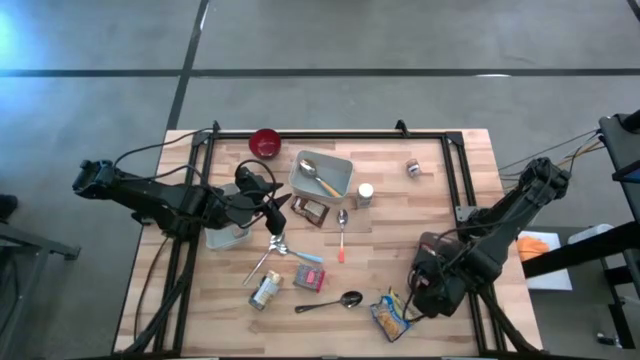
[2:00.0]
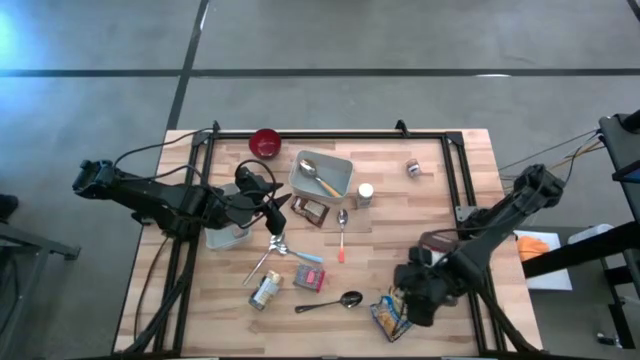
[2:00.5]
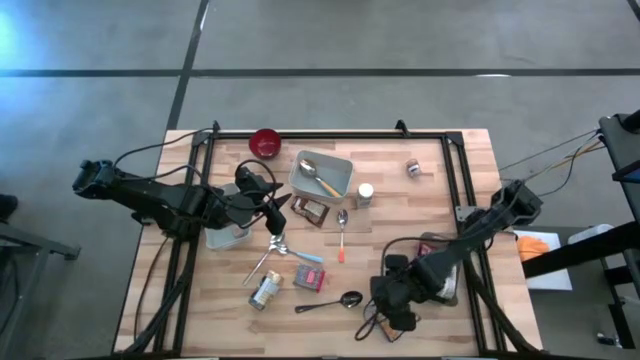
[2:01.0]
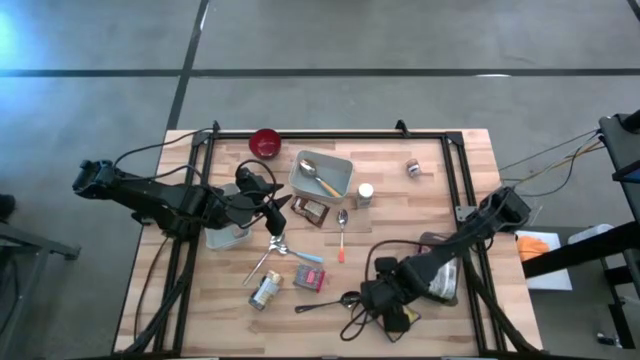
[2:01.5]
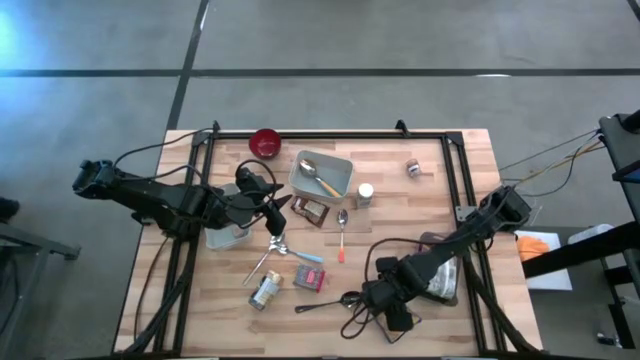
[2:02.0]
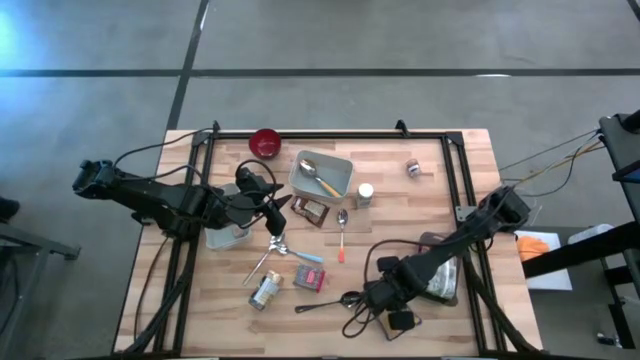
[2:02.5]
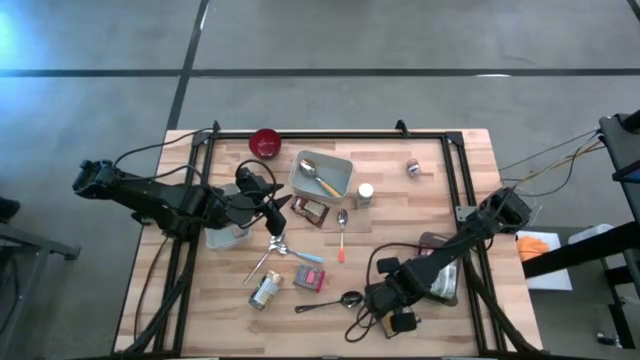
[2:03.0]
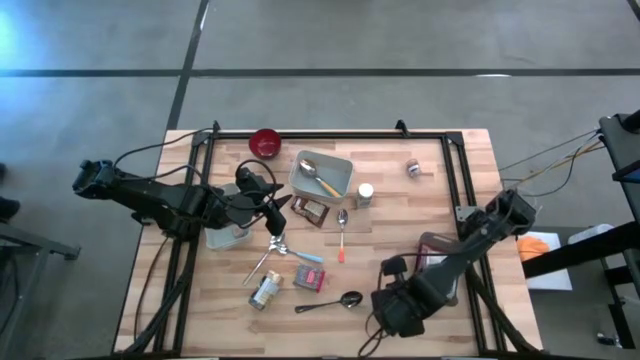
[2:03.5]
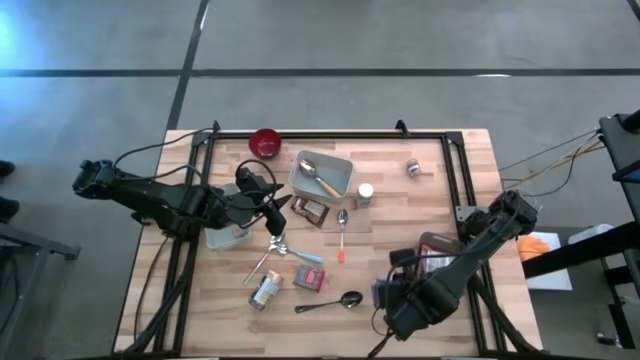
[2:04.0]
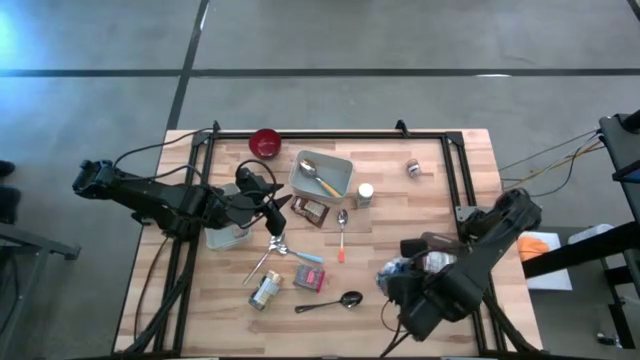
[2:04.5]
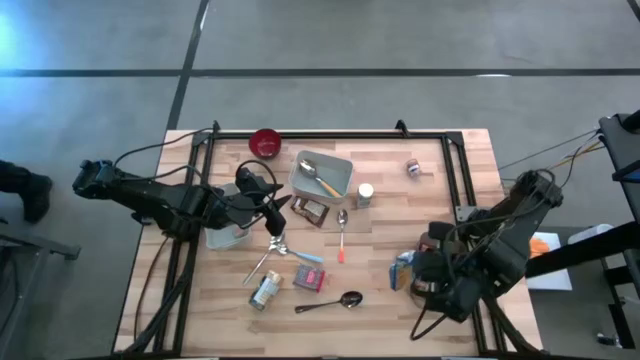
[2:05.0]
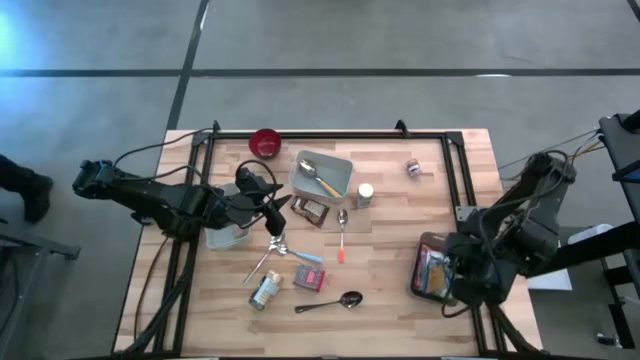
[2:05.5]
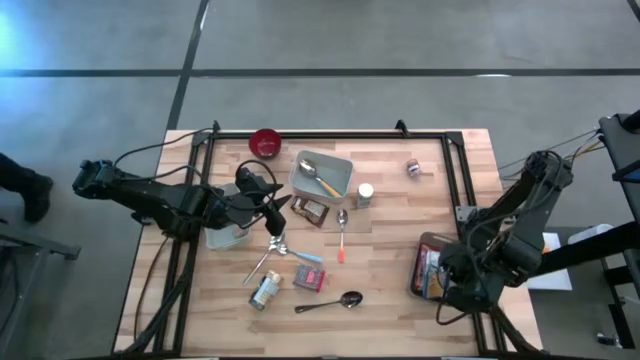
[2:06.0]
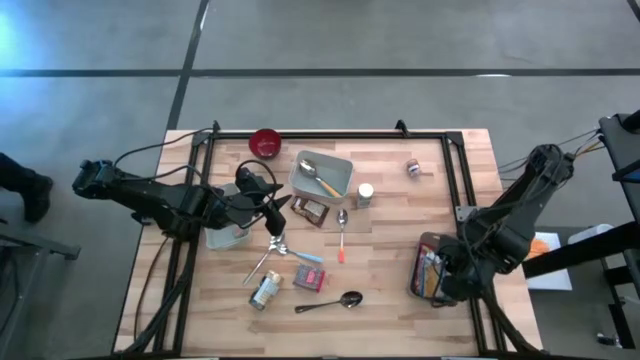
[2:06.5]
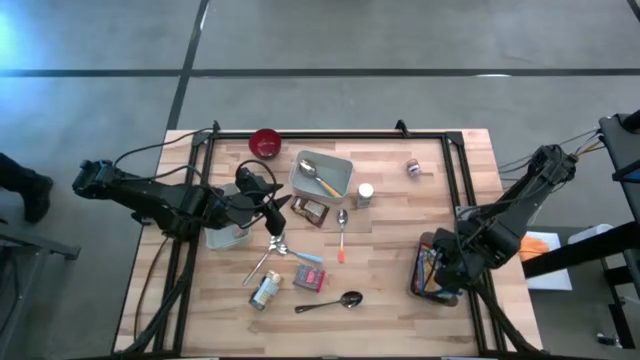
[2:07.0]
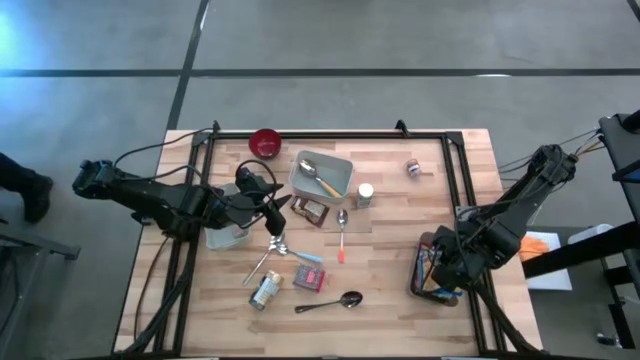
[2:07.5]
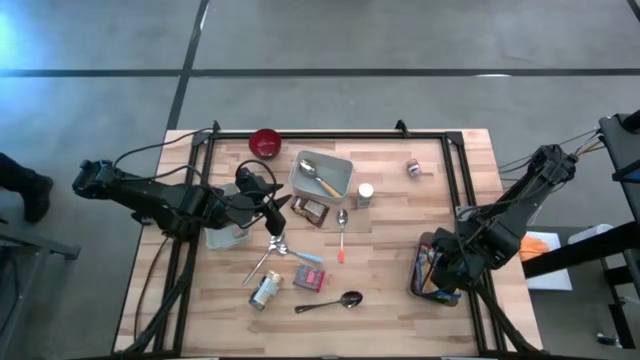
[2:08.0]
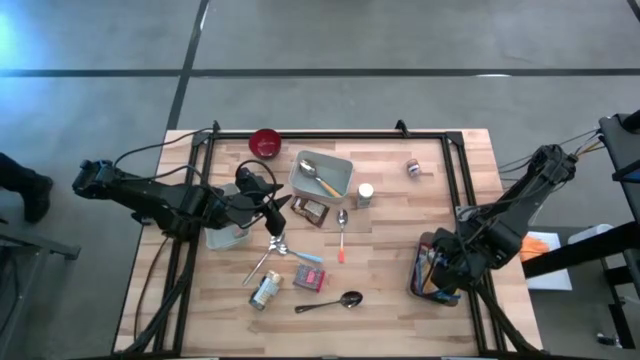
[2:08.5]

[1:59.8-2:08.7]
Put the blue noodle pack into the black bin

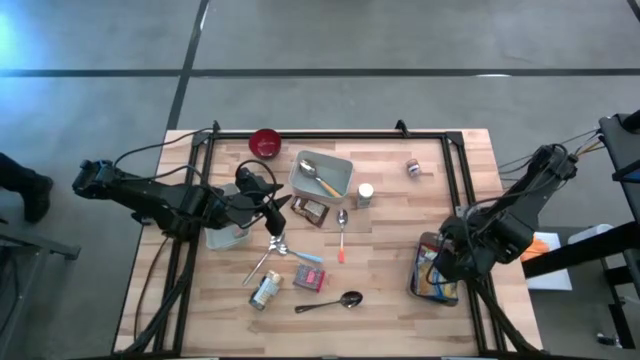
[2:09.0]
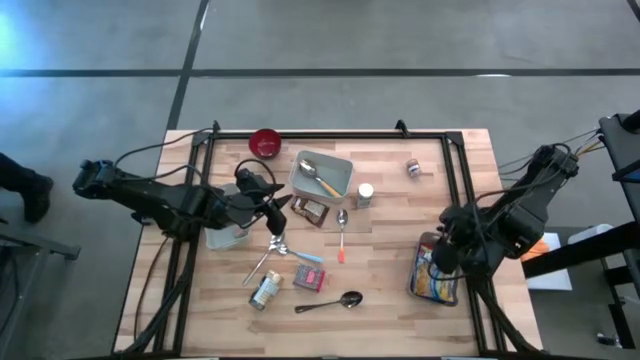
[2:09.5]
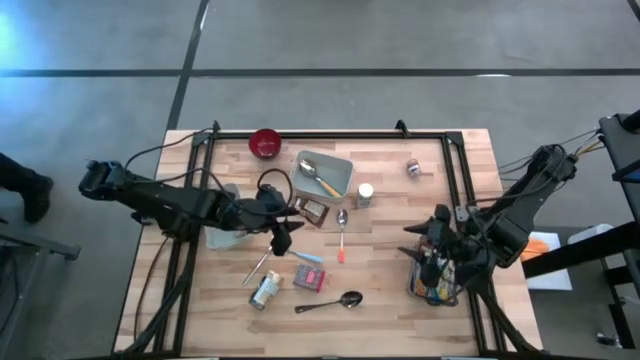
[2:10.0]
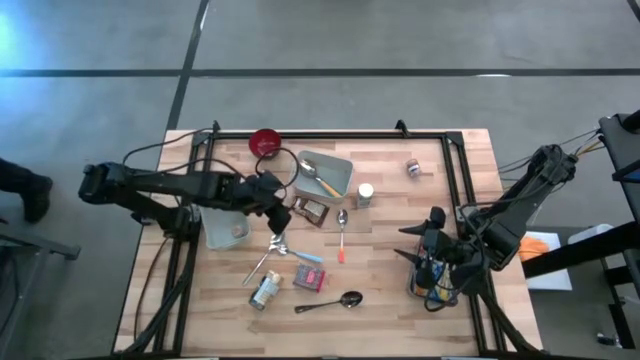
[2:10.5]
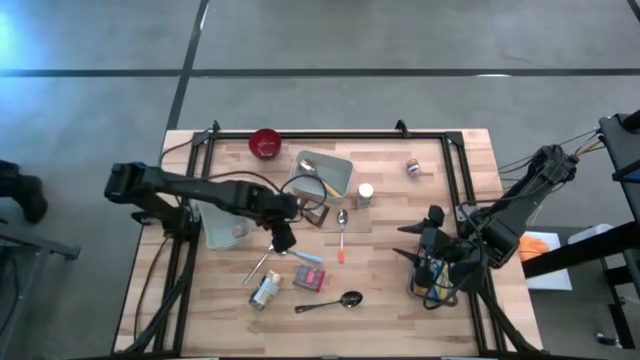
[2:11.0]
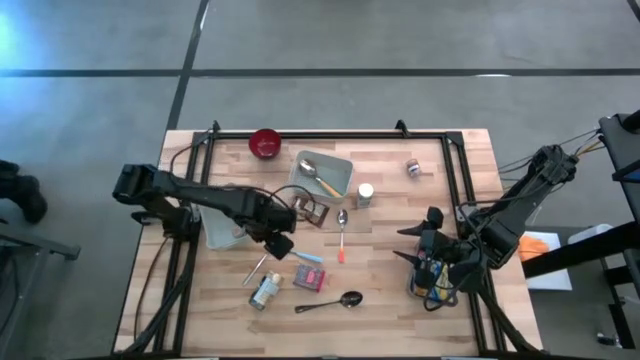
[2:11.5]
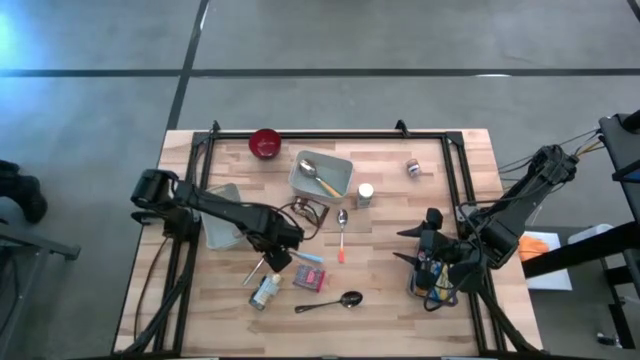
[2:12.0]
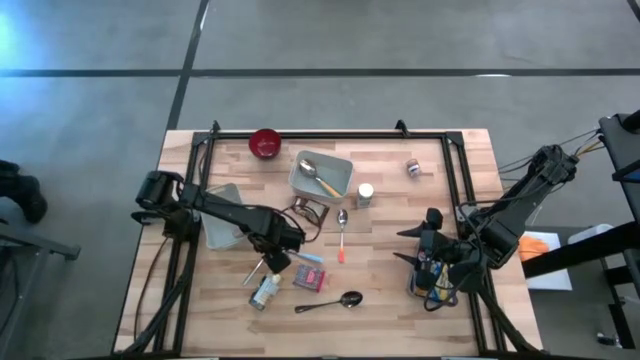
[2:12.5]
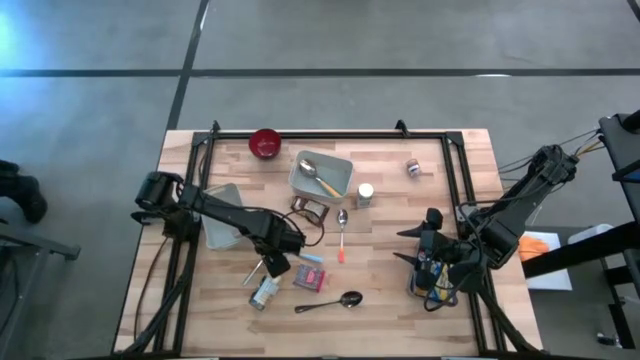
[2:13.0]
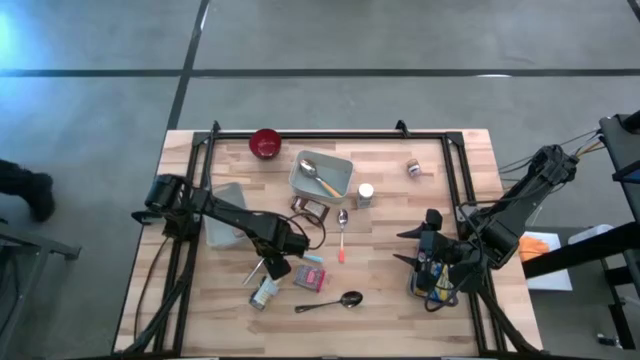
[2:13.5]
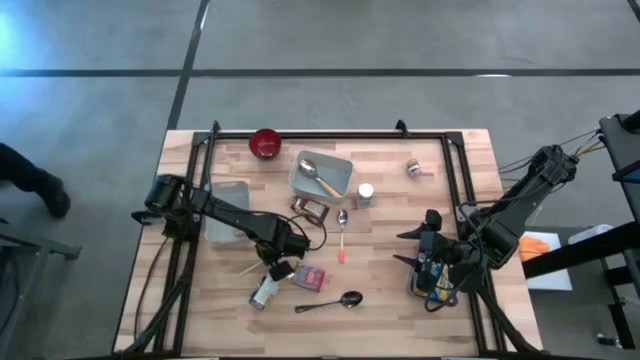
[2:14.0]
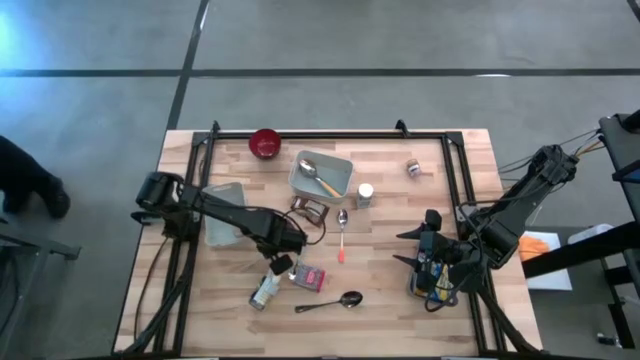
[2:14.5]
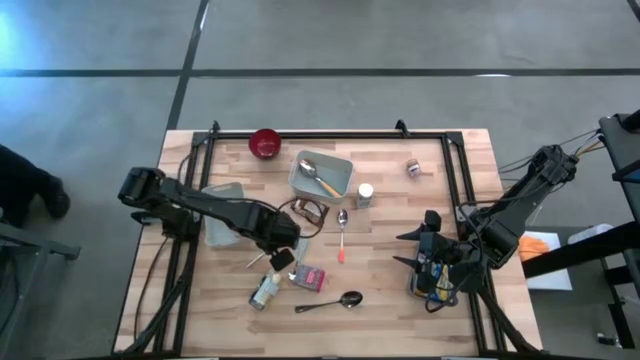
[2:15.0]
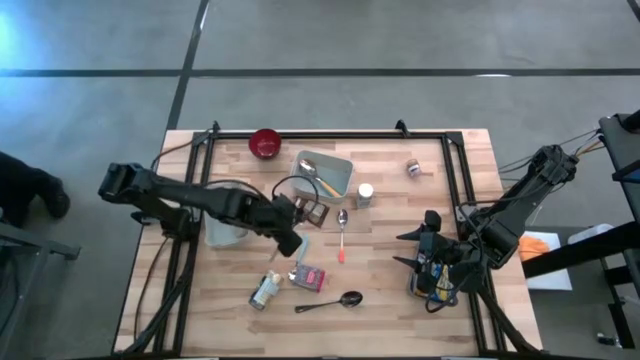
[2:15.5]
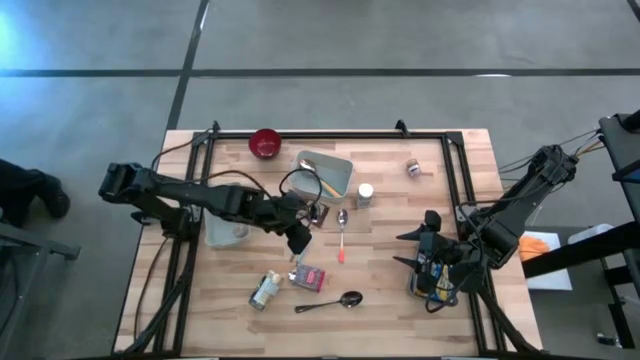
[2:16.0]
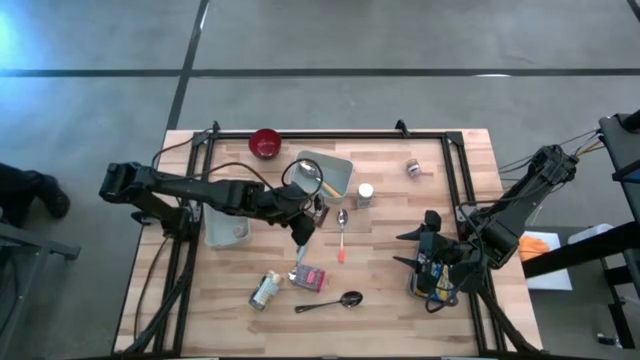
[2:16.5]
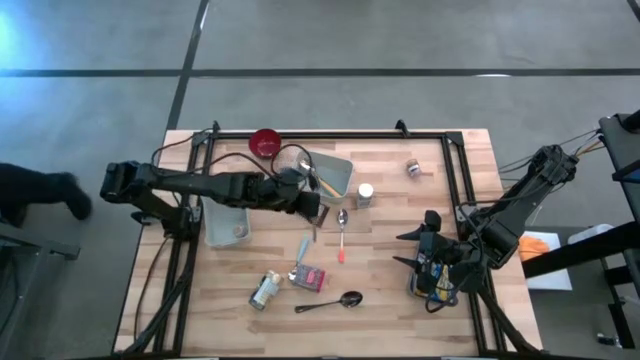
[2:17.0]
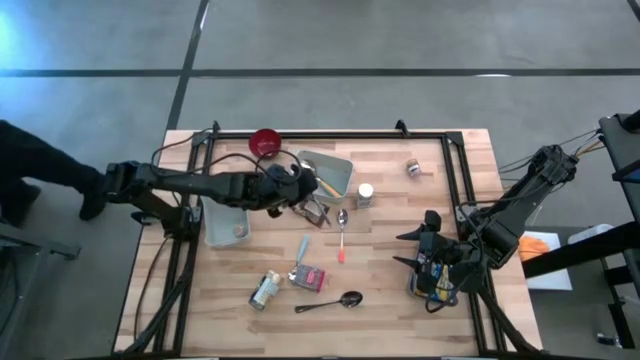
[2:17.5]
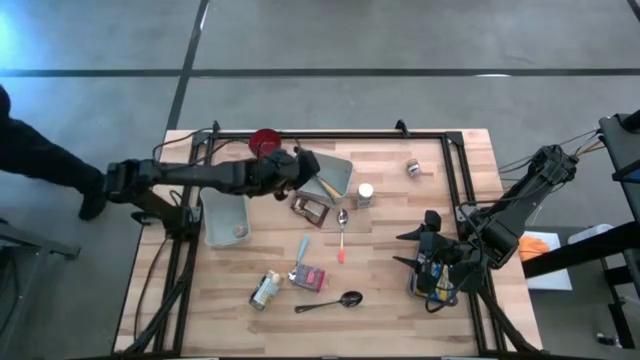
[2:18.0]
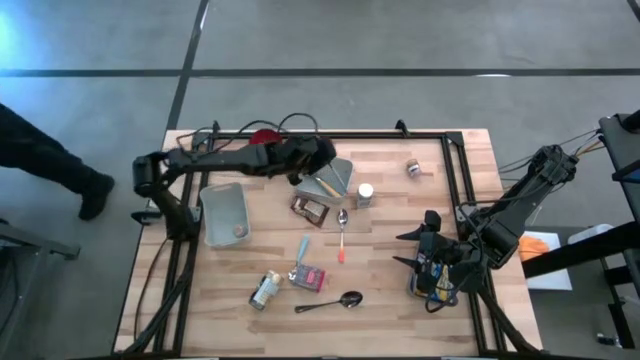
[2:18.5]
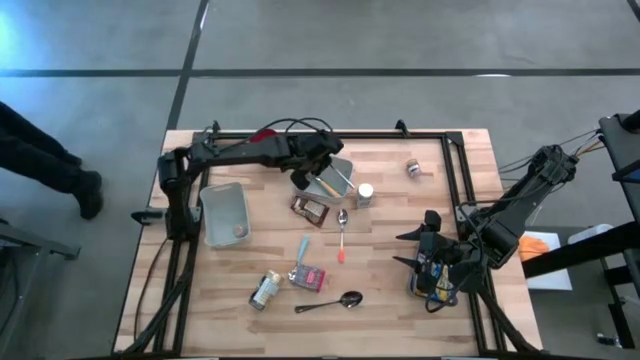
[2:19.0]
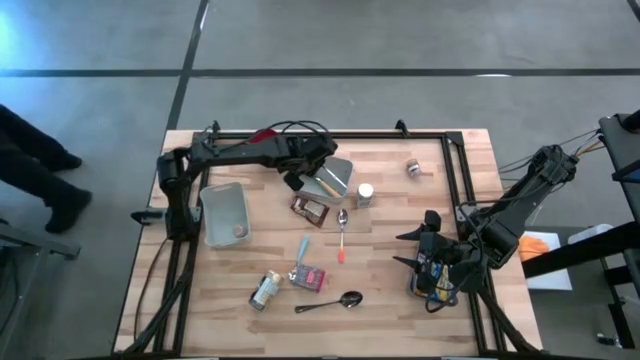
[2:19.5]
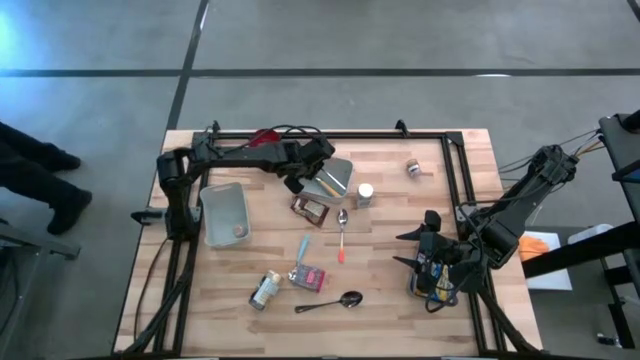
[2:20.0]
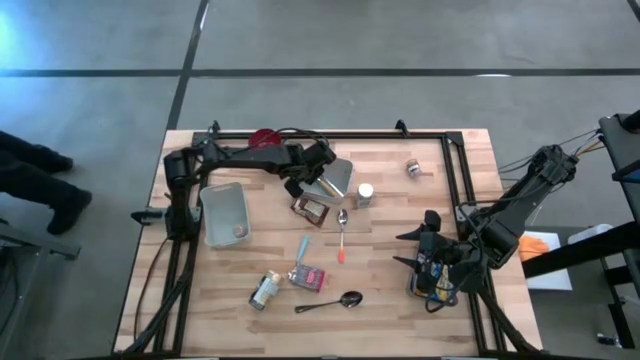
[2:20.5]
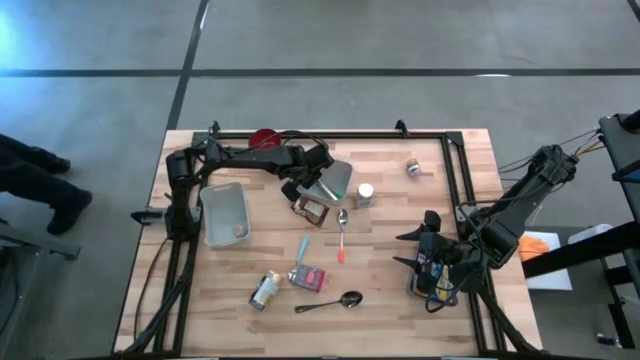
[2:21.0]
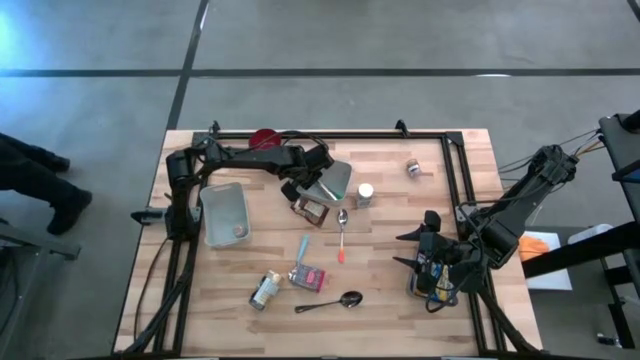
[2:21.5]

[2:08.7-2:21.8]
Put the silver spoon into the right gray bin
